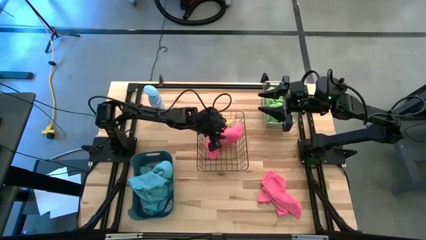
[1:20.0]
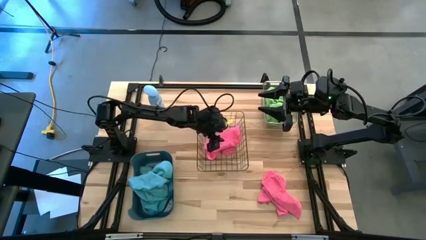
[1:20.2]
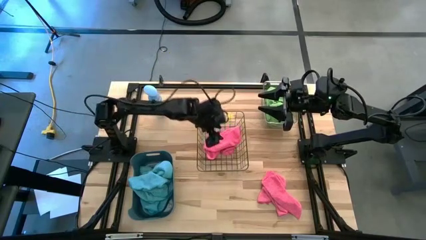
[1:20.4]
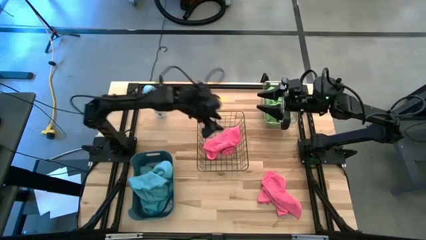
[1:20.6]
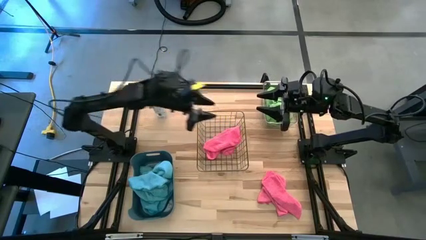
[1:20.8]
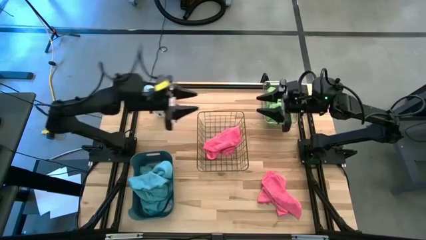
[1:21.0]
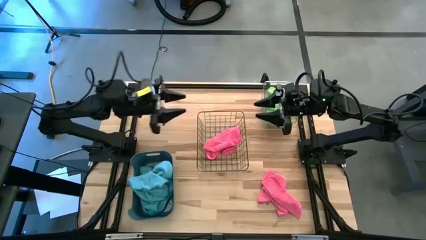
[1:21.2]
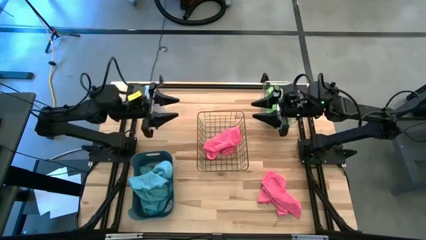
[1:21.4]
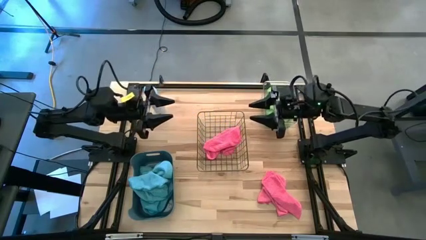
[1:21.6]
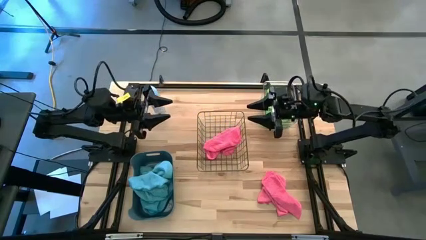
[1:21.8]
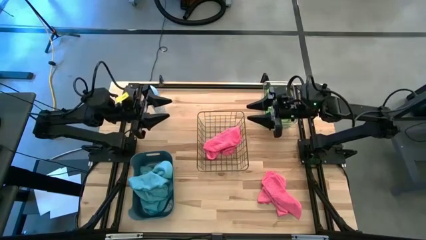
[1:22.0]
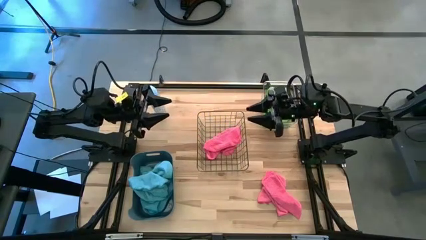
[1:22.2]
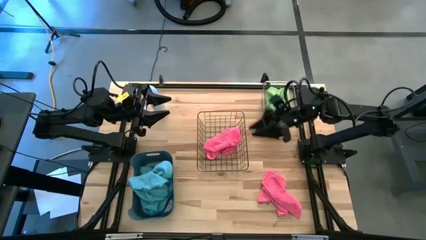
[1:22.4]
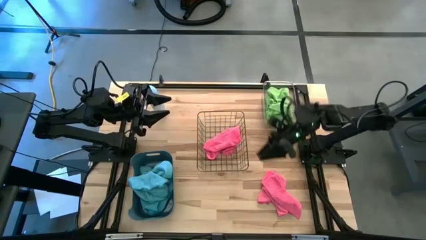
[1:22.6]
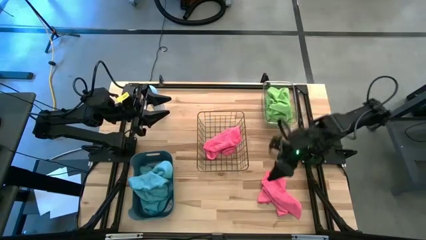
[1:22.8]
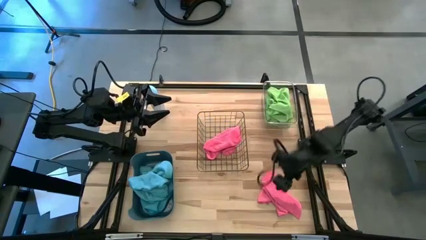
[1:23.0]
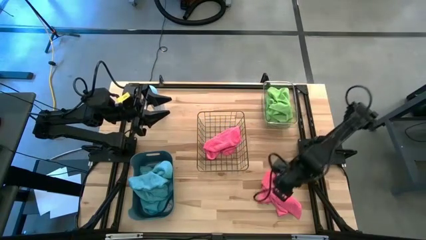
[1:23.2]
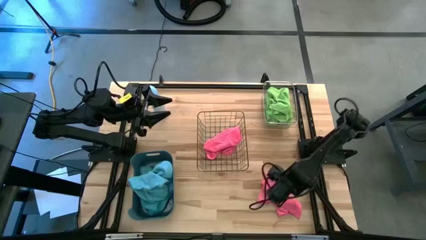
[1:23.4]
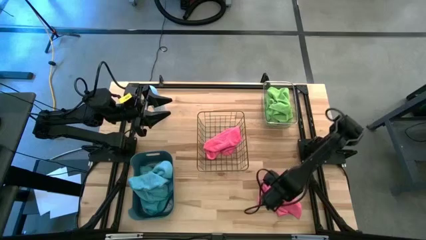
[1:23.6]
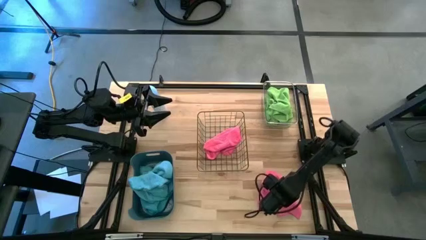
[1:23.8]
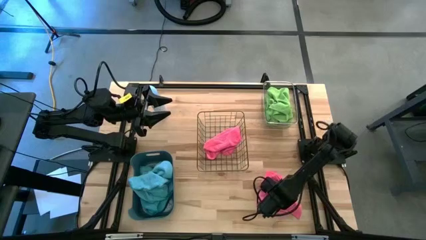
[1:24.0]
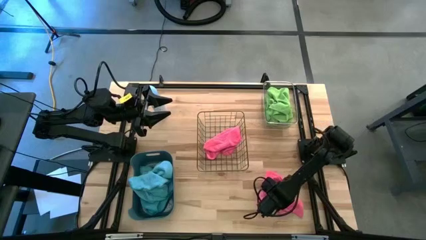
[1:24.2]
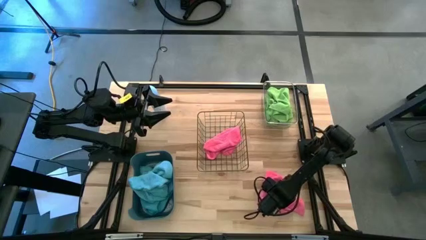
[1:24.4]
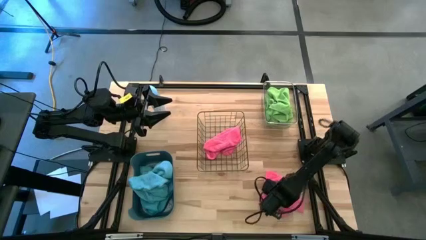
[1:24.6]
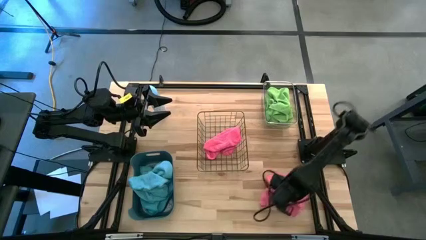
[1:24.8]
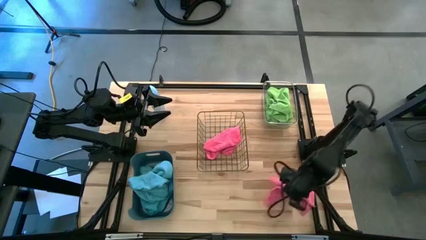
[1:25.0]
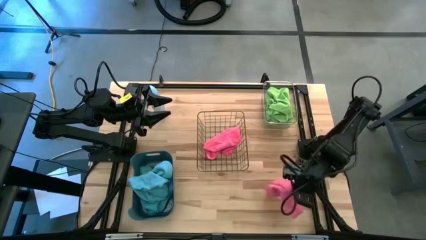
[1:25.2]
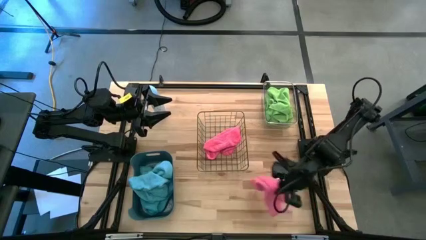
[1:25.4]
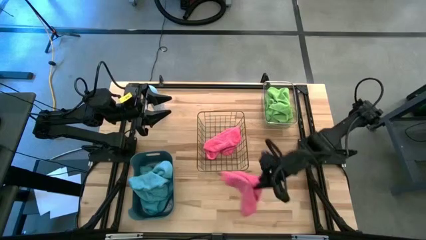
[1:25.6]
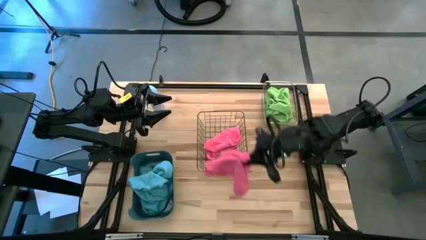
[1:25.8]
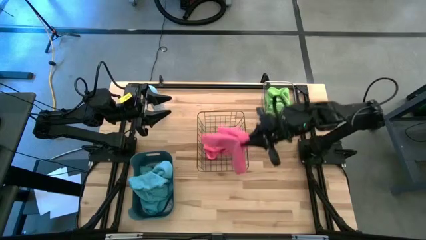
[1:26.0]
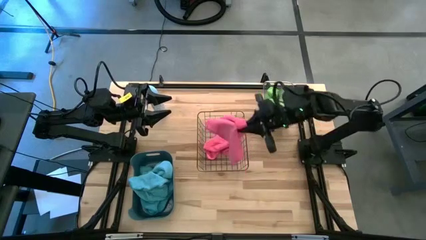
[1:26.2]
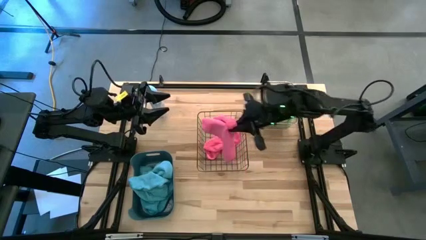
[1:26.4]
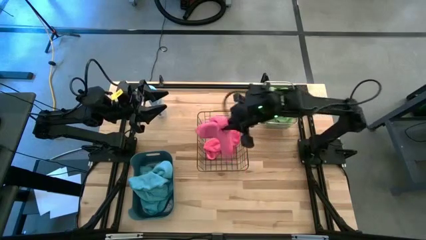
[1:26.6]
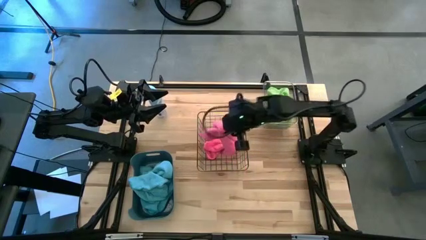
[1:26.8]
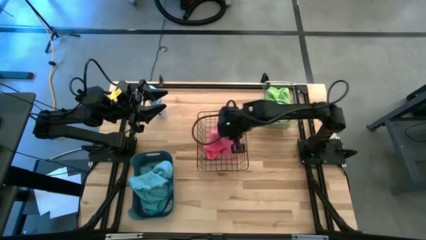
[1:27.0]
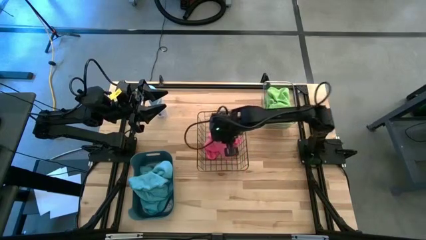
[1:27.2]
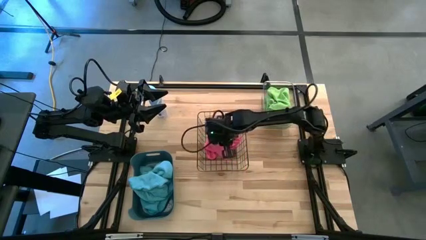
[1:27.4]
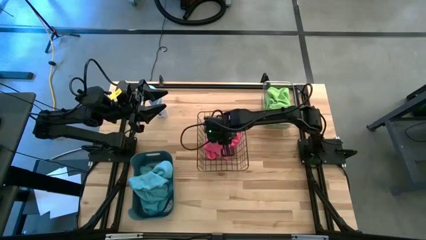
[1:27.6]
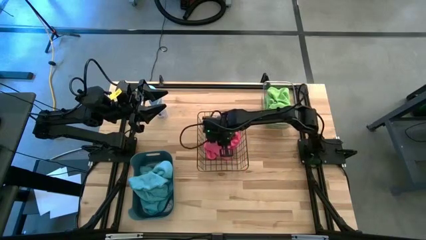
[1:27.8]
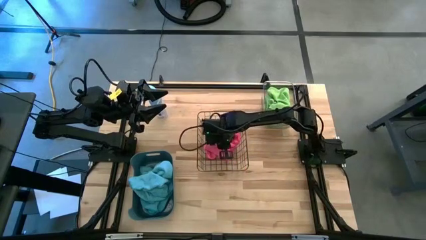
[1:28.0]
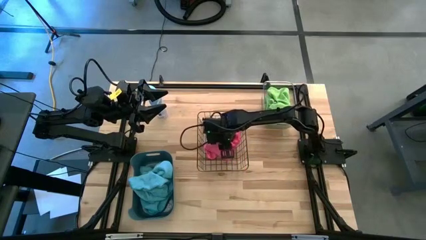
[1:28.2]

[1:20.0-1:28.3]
Task: Sort microfiber towel by color & place in baskets
Put the pink microfiber cloth into the gold wire basket

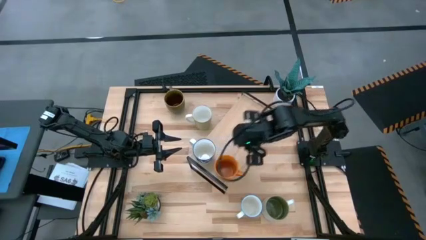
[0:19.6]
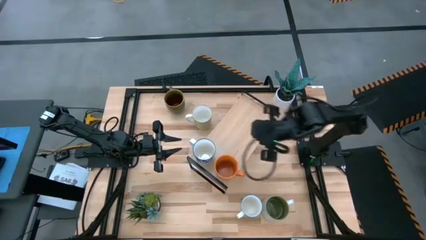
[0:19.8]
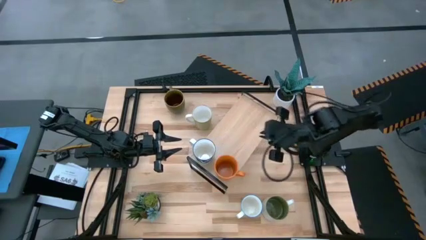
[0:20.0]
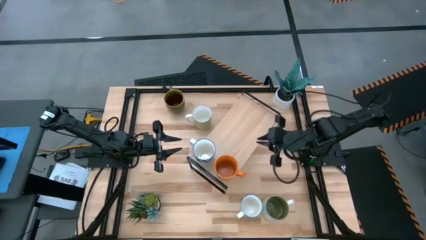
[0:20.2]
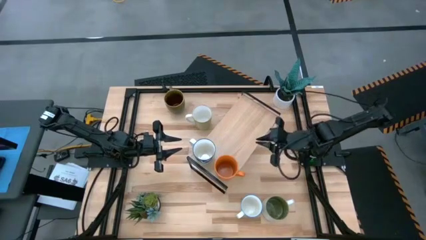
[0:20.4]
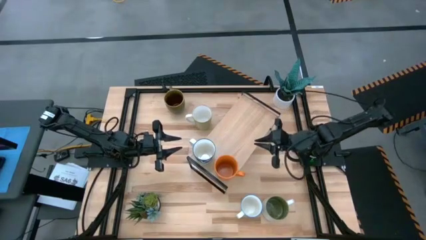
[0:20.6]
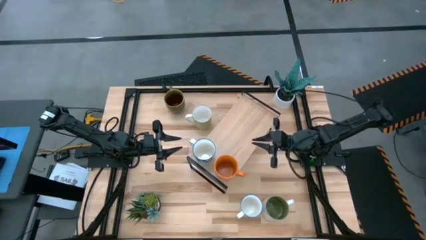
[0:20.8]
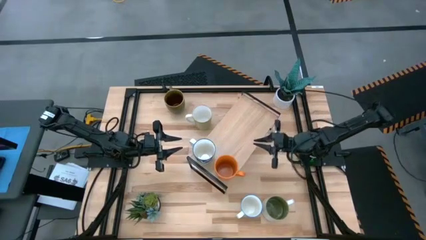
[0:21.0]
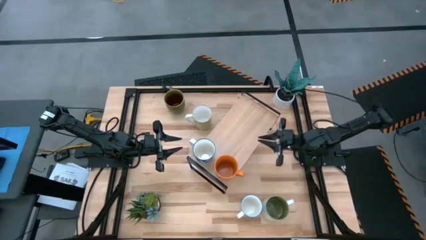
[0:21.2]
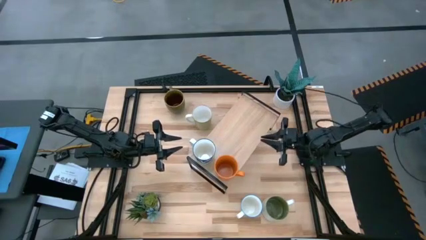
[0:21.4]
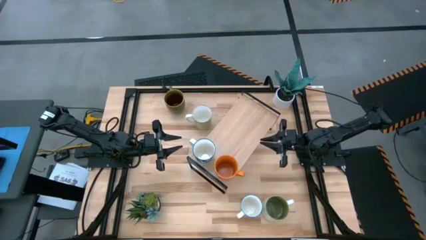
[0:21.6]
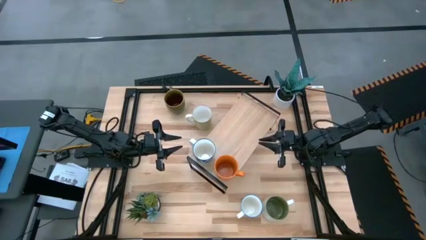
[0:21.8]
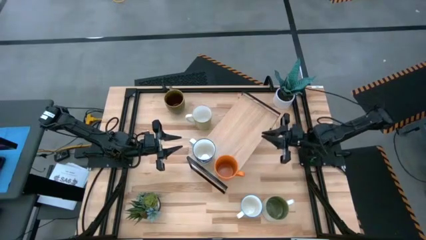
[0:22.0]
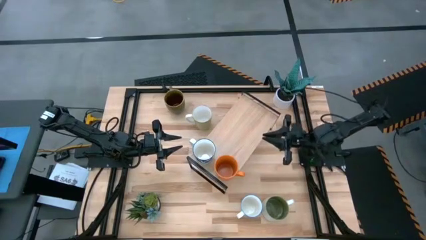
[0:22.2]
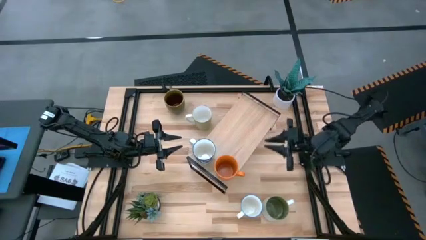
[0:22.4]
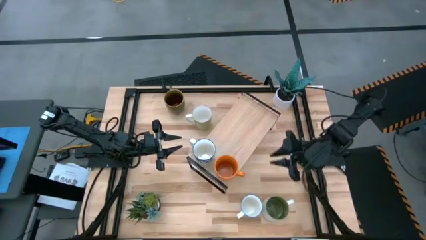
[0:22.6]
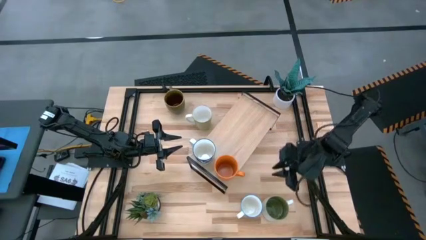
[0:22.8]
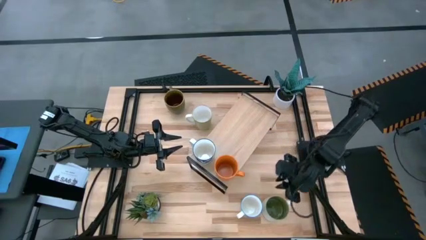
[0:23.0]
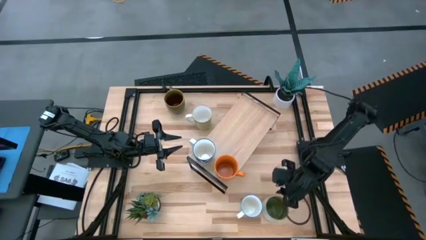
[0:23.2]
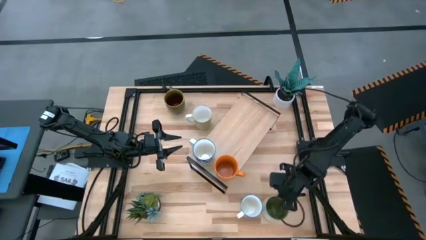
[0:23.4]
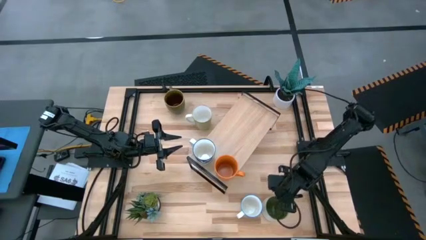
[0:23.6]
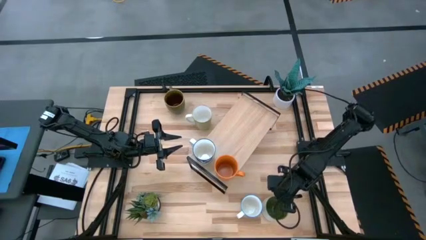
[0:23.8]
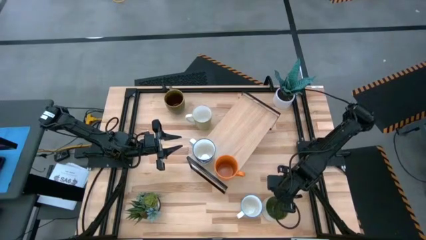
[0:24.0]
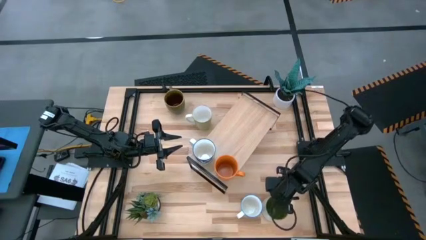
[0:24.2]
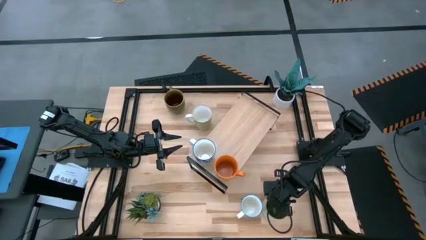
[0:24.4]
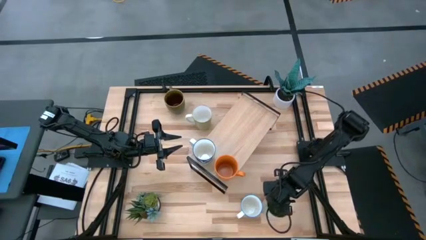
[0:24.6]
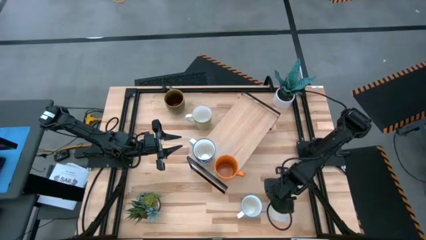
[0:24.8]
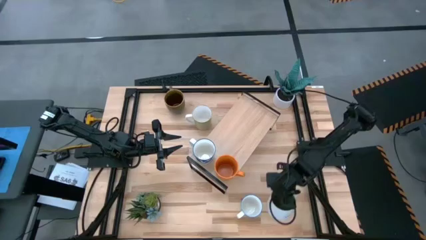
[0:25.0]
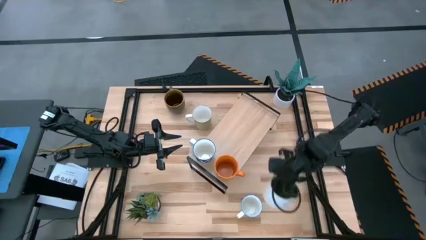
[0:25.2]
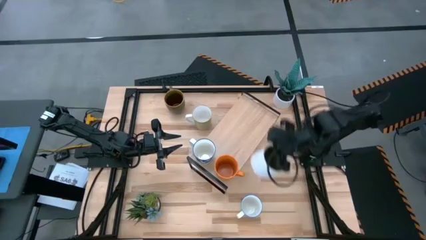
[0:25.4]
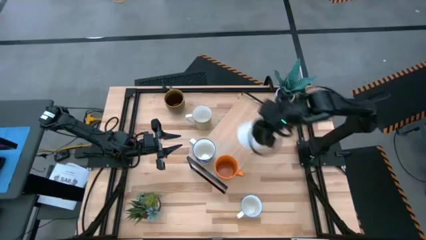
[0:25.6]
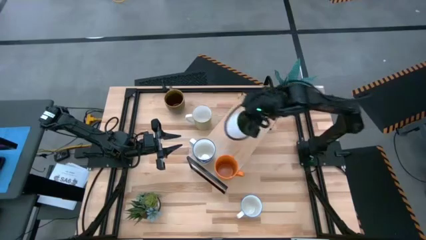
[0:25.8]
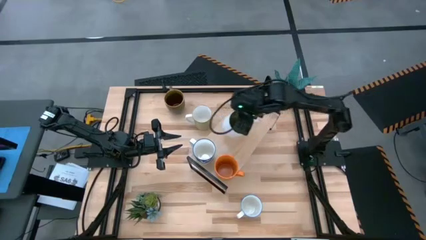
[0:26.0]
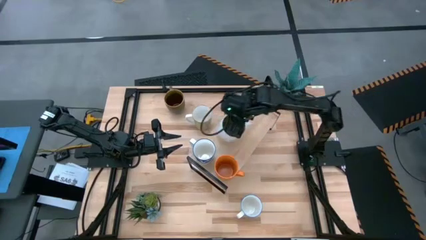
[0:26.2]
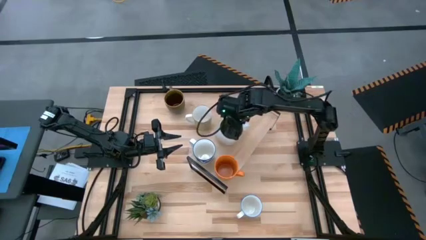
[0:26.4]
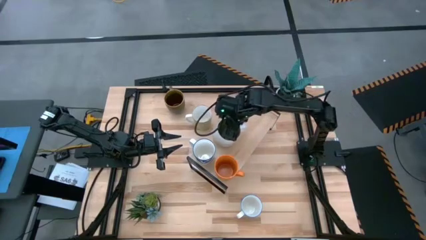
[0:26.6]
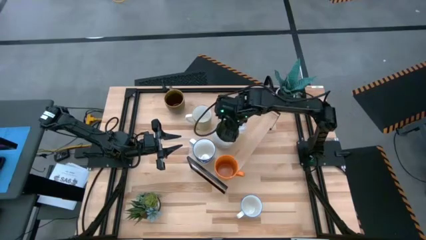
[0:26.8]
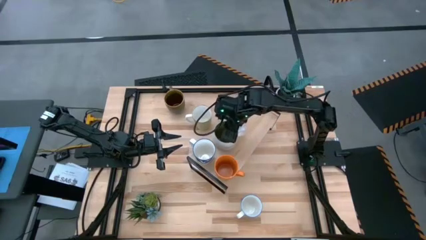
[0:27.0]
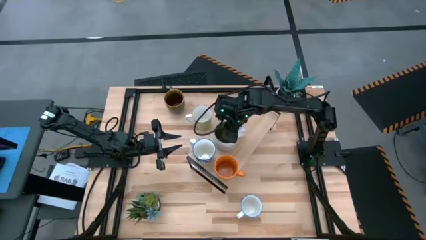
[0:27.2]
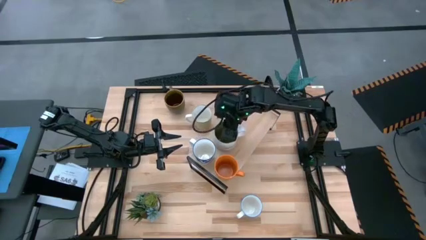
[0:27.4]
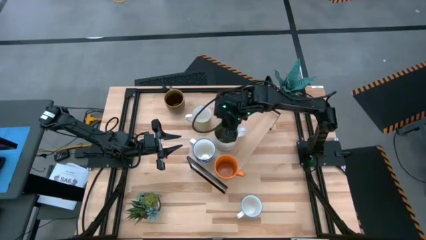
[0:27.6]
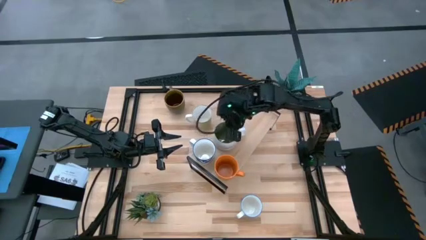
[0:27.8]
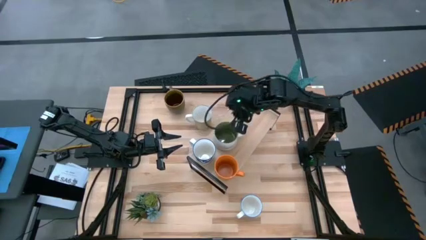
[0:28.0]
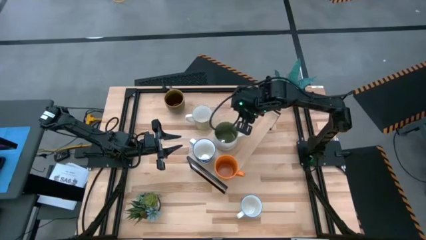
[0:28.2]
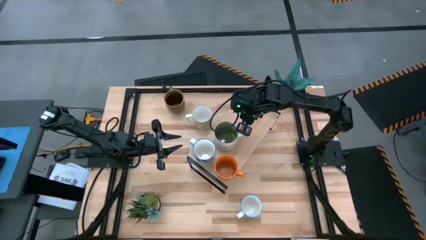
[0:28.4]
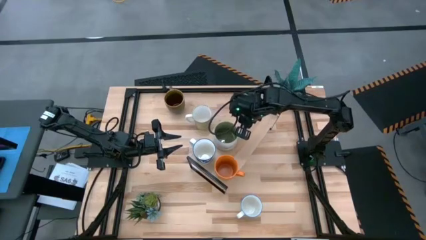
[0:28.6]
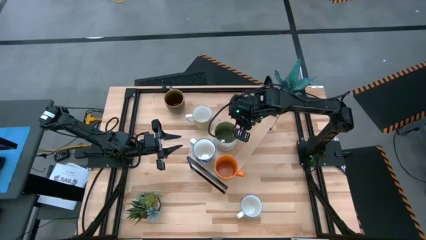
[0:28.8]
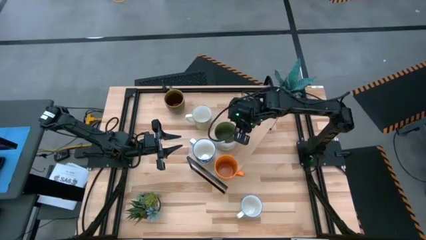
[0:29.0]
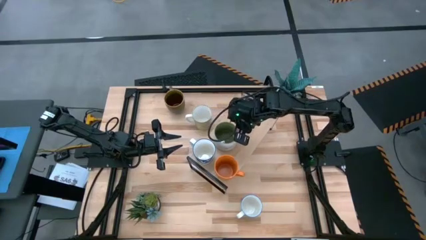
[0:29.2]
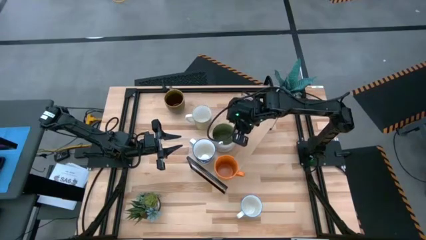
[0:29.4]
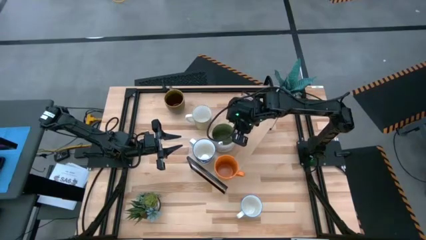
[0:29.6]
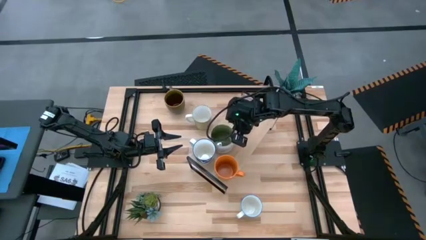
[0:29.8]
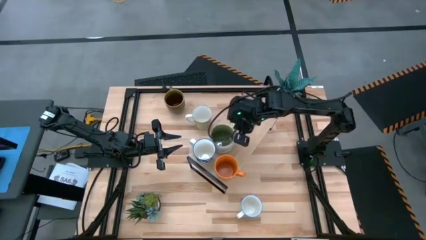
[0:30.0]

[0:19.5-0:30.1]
Task: Place coffee mugs
Put the white mug on the shelf
